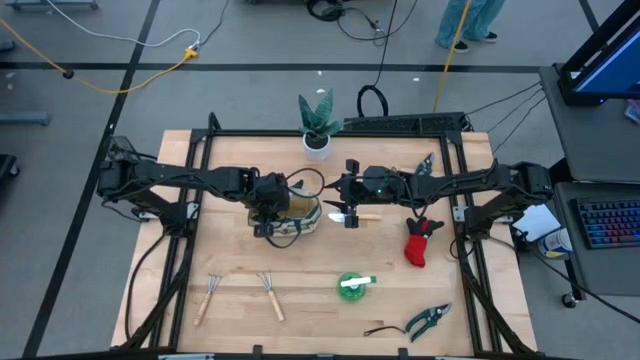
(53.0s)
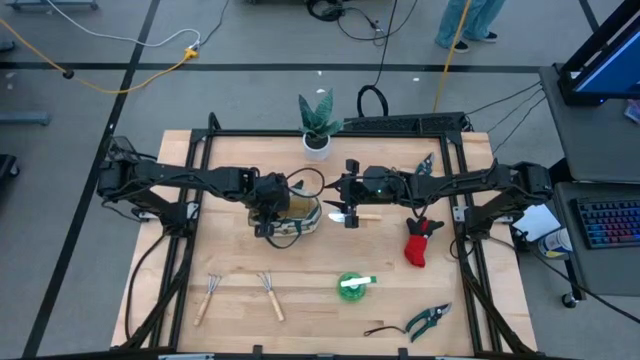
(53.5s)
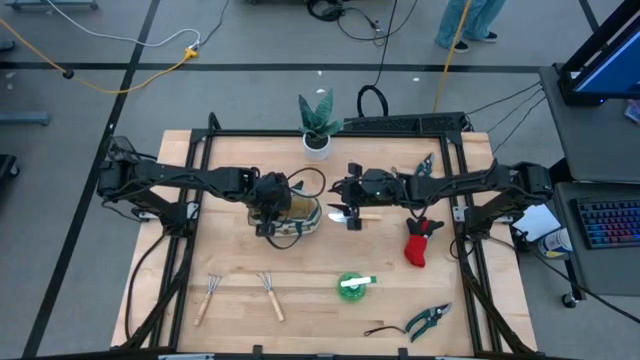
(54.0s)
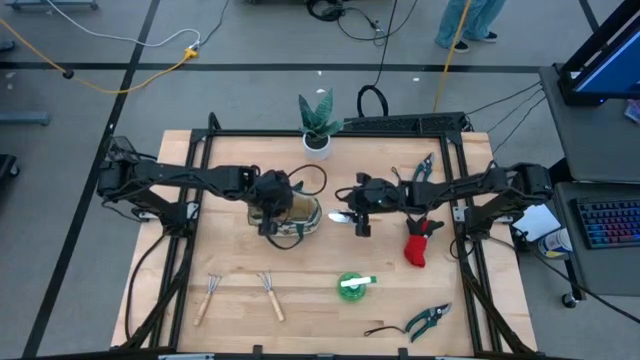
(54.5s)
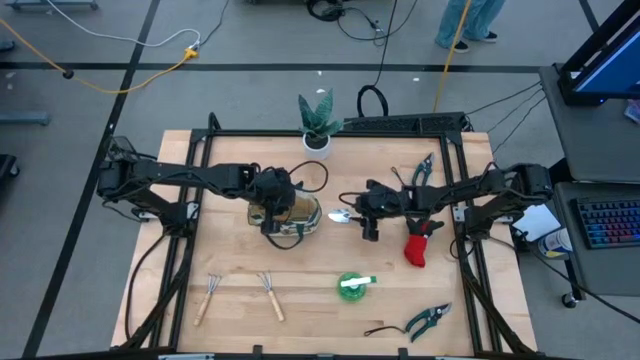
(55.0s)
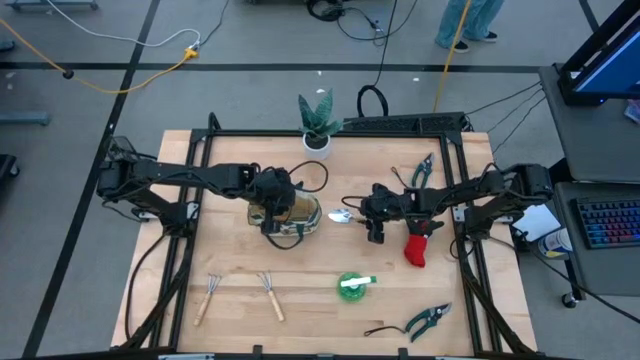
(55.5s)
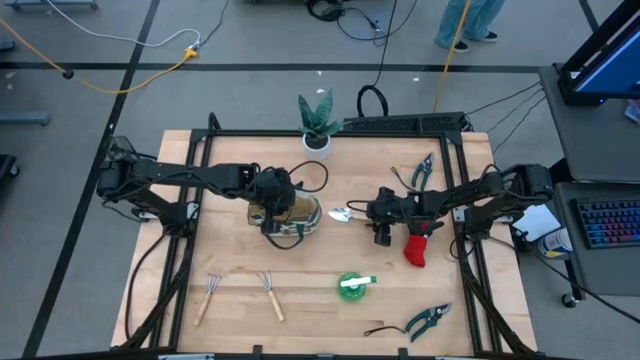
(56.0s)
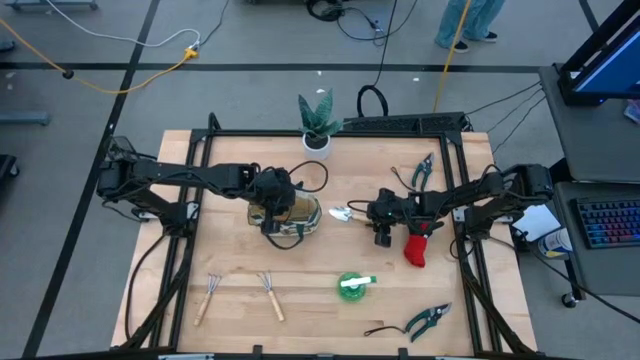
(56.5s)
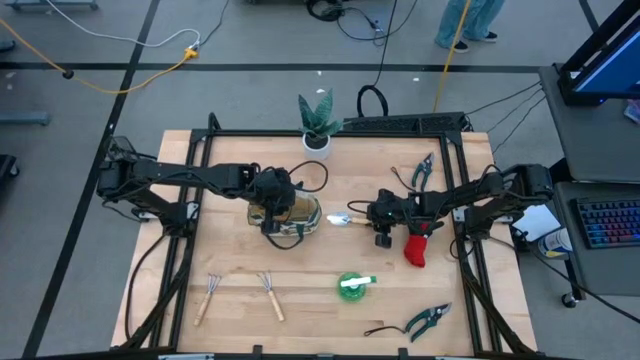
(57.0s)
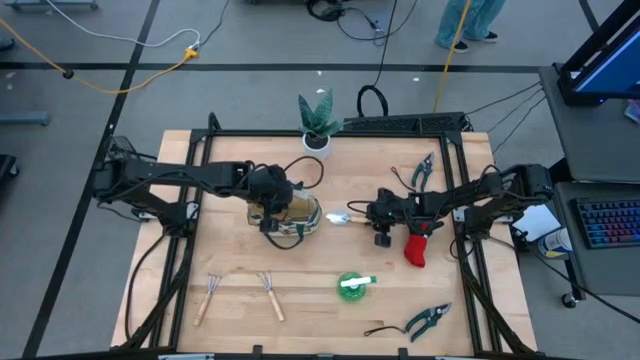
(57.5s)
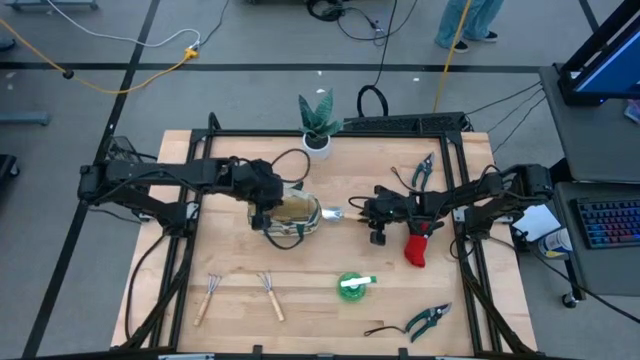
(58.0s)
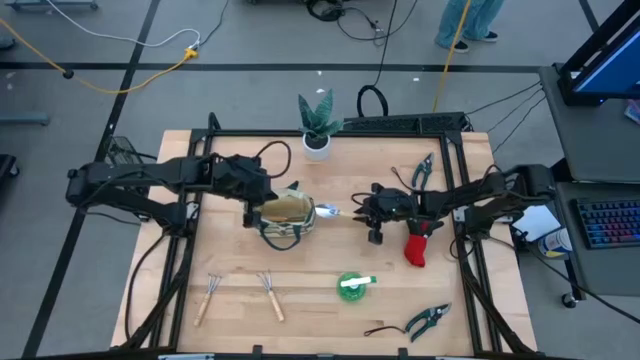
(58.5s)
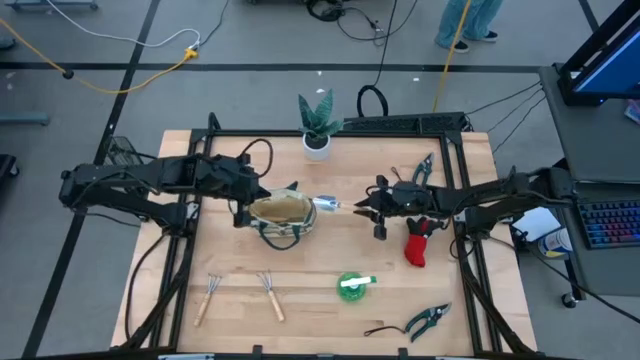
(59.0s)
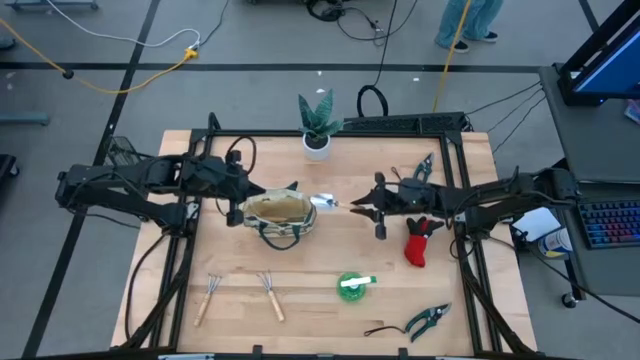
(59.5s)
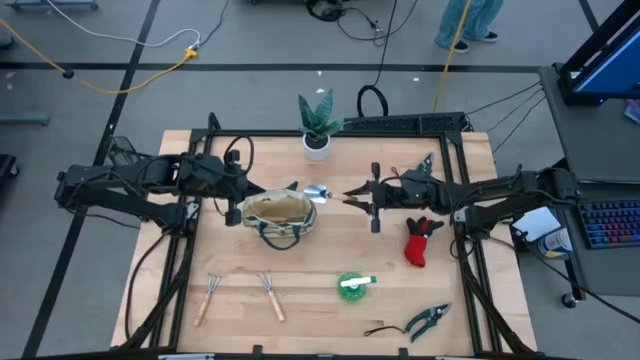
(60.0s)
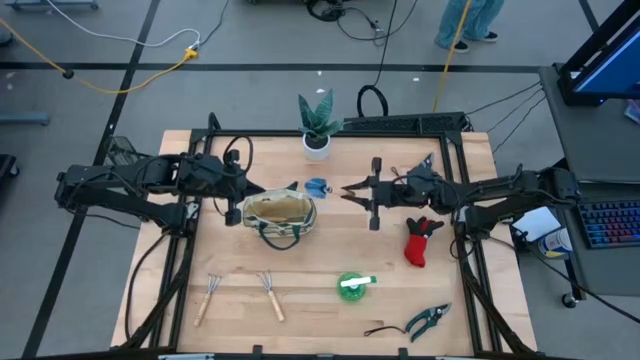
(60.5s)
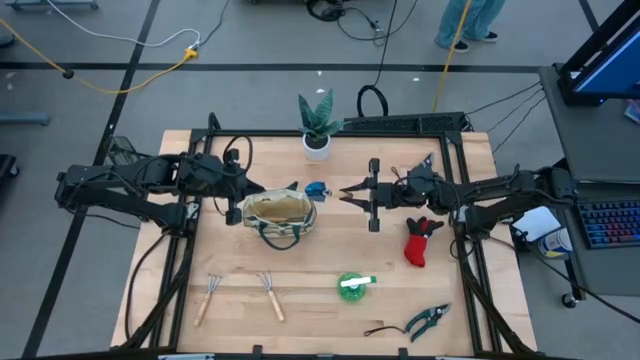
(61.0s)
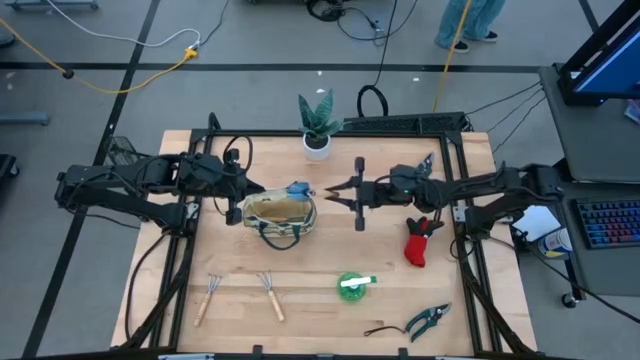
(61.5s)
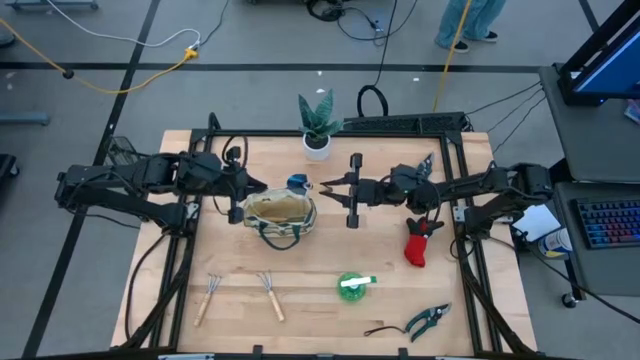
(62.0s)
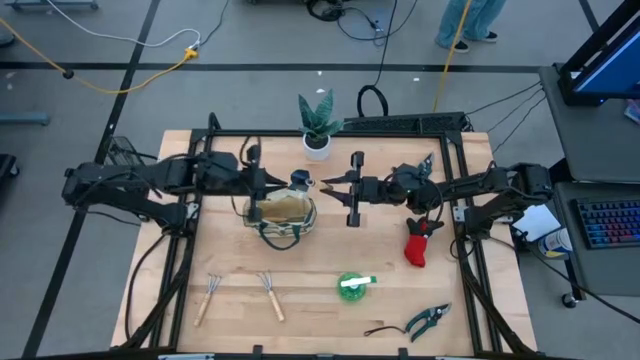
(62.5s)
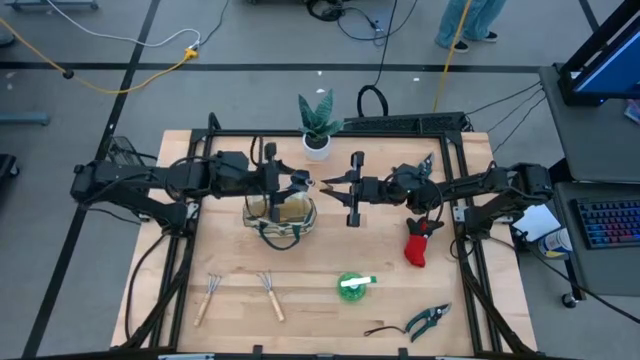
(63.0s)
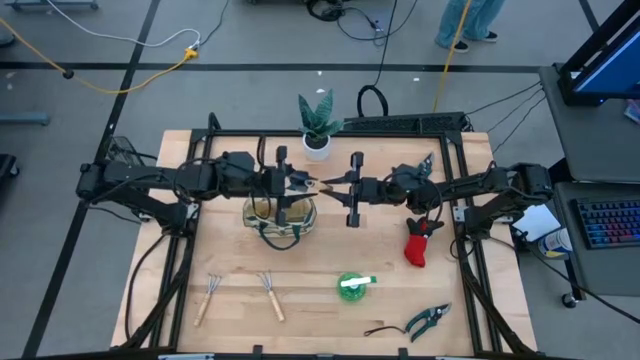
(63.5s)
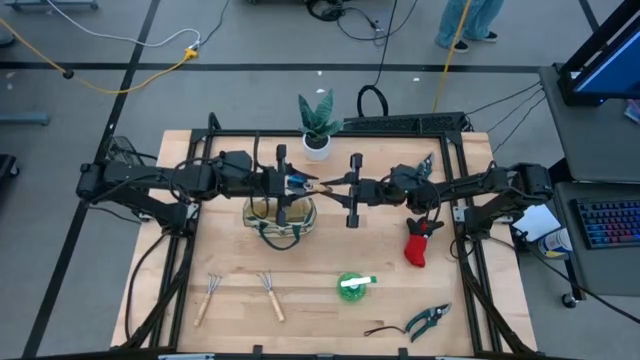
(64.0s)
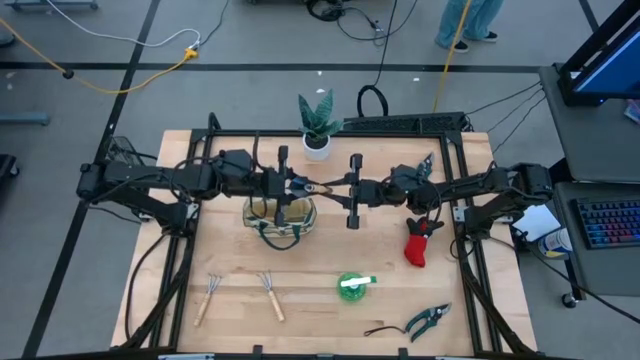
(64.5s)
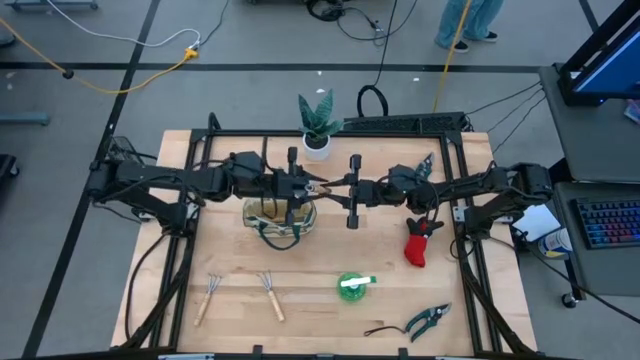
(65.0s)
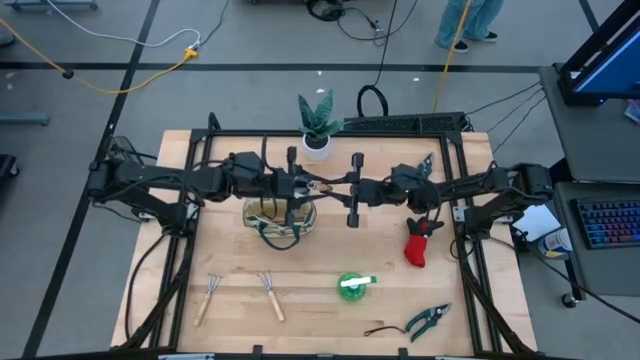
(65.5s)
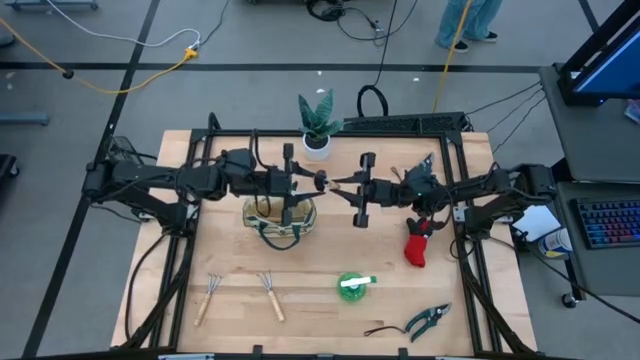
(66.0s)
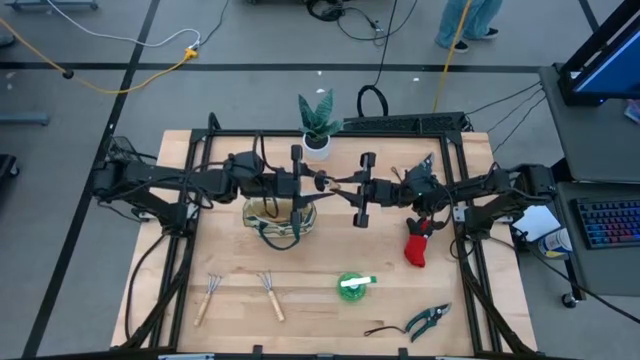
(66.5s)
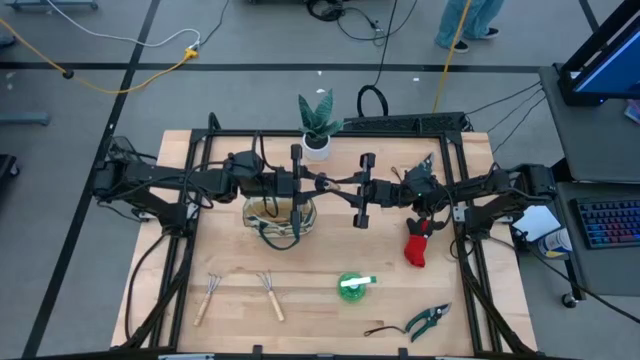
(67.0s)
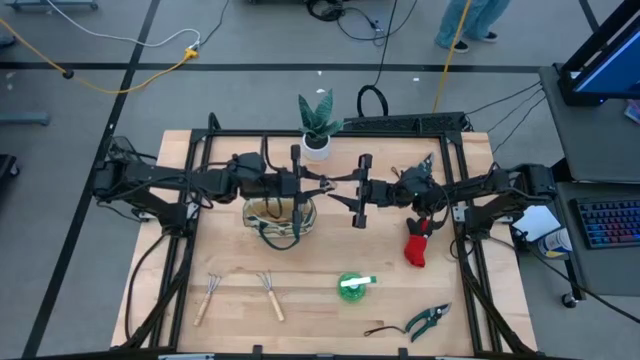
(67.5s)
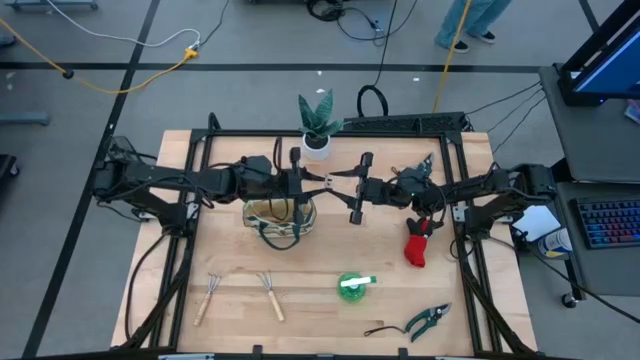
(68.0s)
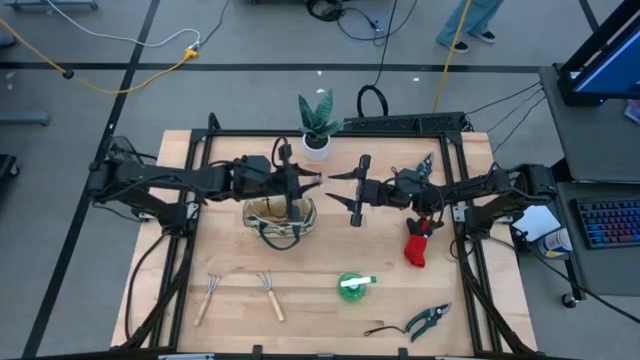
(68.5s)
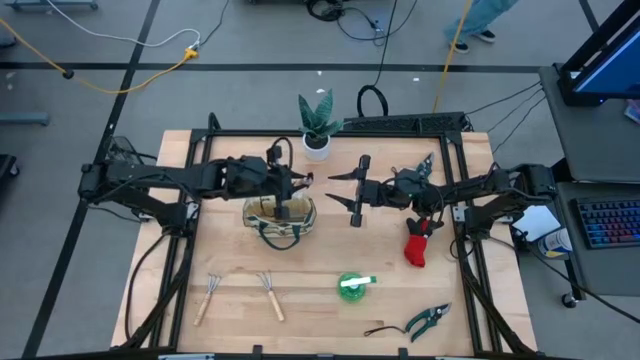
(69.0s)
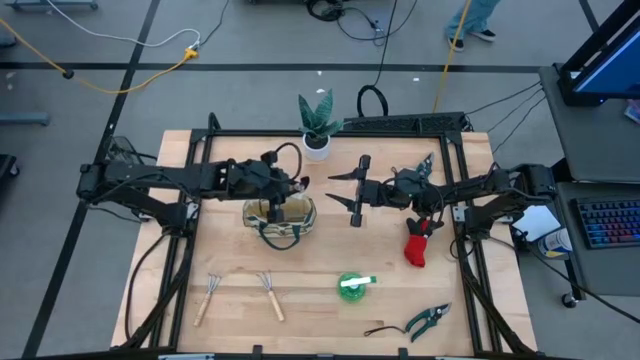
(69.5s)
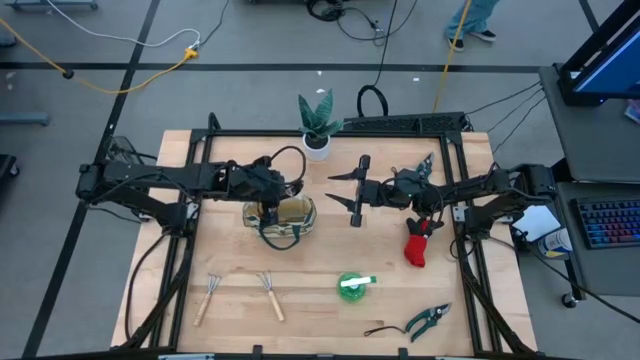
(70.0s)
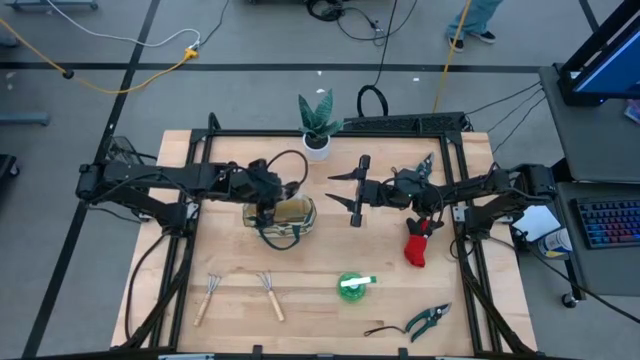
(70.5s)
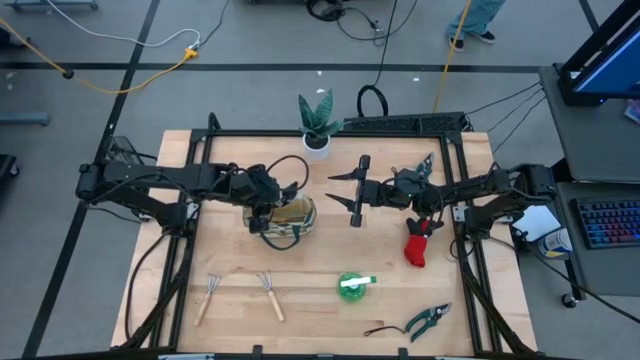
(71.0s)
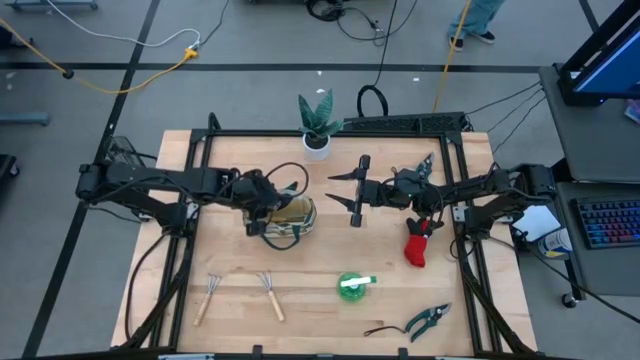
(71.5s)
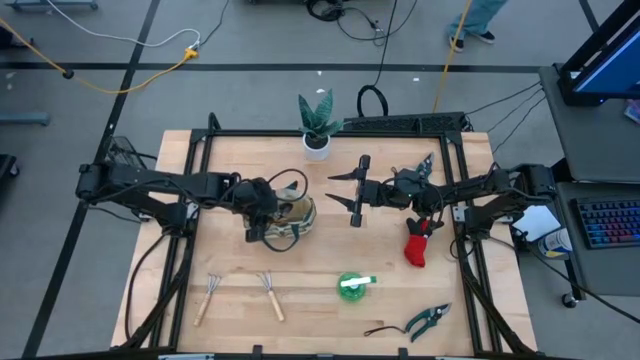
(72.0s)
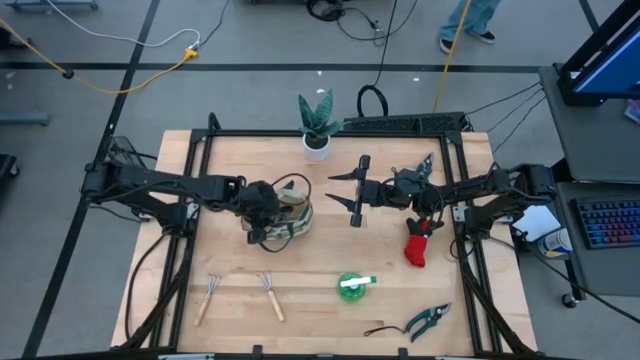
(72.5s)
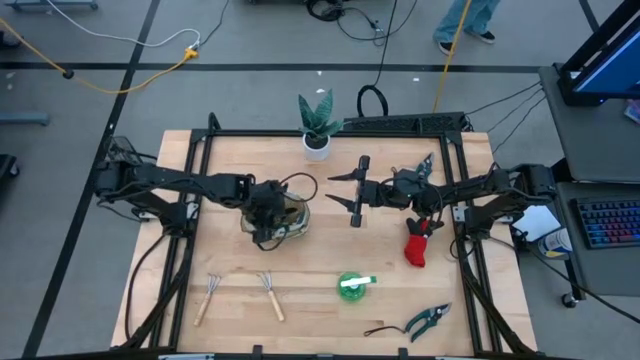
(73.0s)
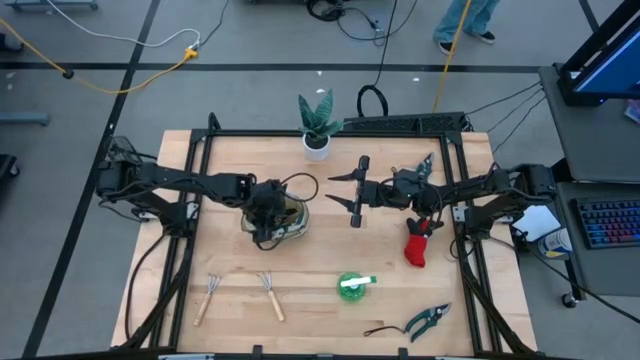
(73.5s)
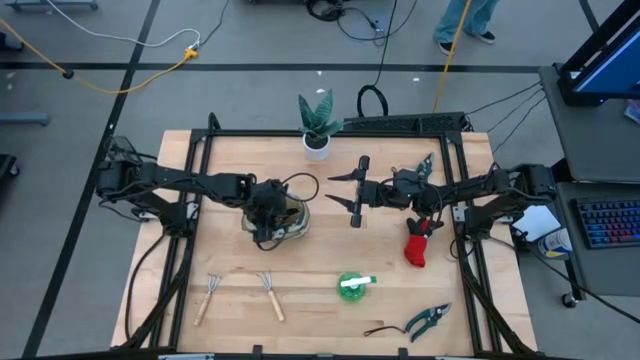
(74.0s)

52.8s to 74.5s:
Task: Pick & Place Garden tools in Gardening bag
Put the brown trowel into the white gardening bag
